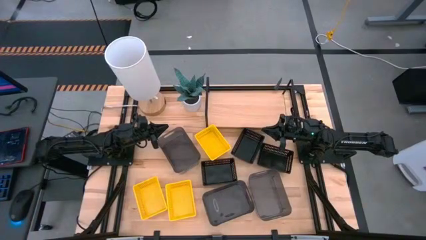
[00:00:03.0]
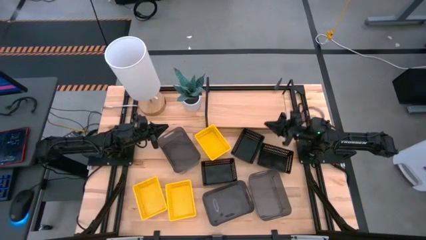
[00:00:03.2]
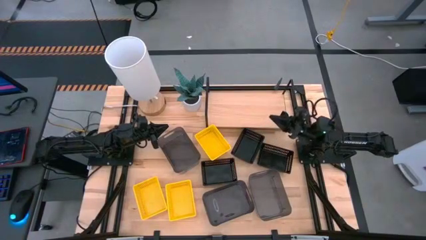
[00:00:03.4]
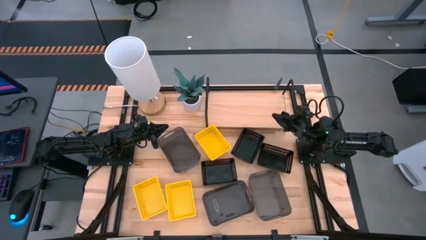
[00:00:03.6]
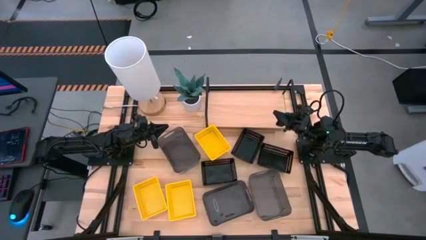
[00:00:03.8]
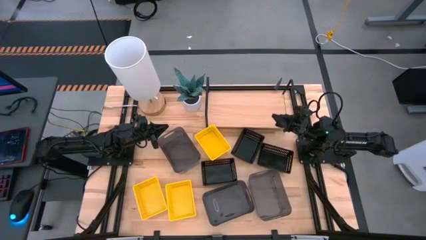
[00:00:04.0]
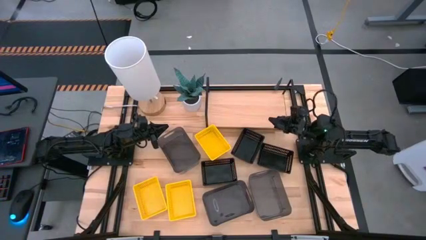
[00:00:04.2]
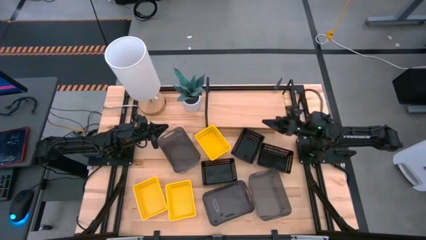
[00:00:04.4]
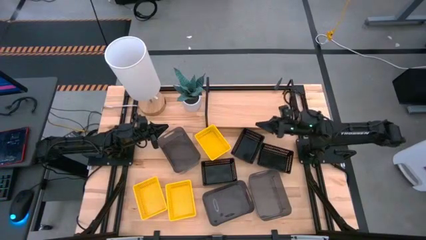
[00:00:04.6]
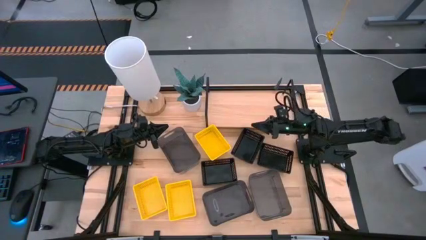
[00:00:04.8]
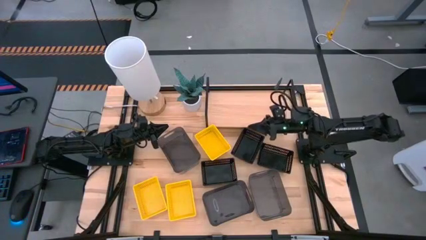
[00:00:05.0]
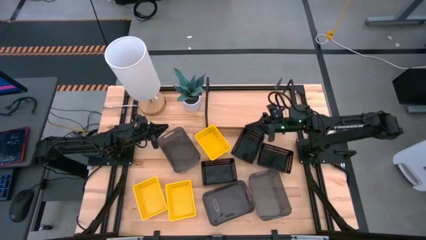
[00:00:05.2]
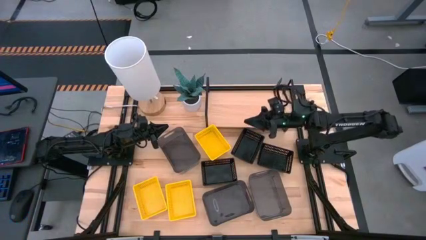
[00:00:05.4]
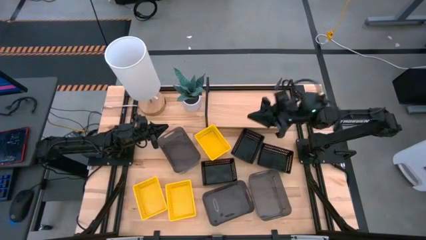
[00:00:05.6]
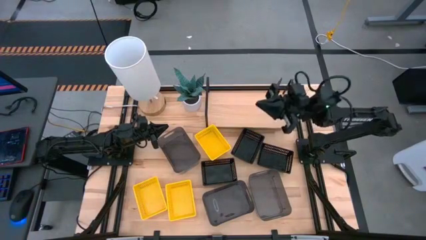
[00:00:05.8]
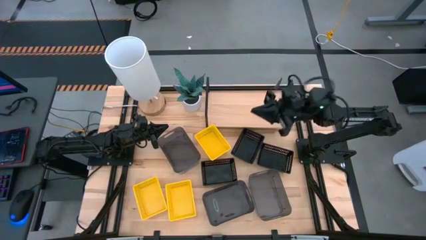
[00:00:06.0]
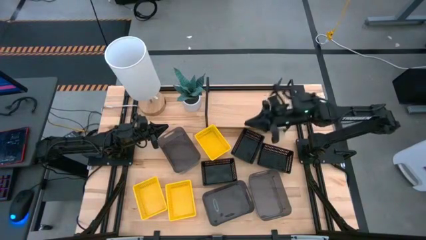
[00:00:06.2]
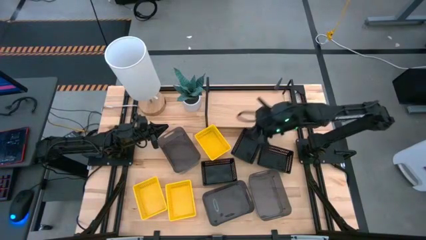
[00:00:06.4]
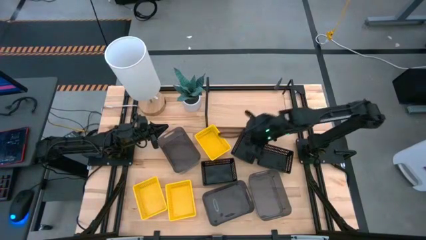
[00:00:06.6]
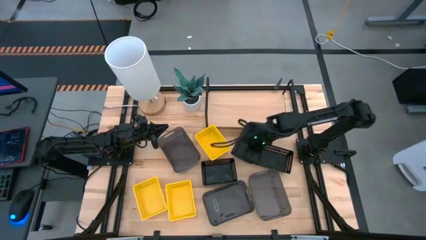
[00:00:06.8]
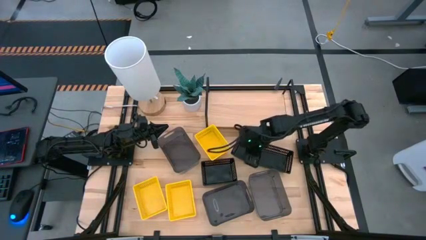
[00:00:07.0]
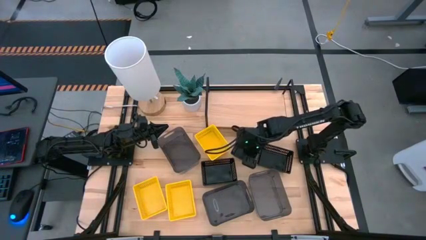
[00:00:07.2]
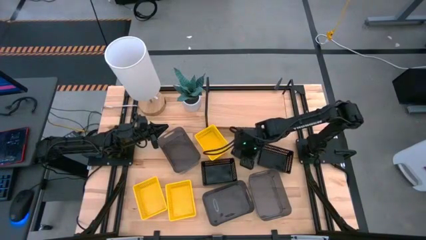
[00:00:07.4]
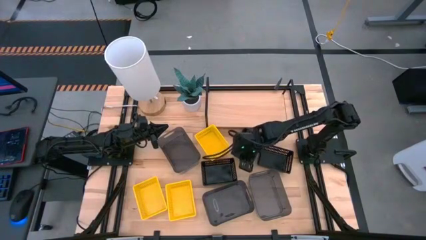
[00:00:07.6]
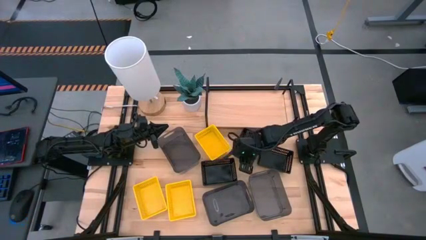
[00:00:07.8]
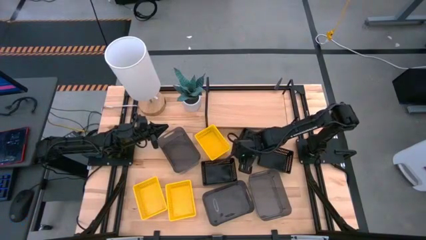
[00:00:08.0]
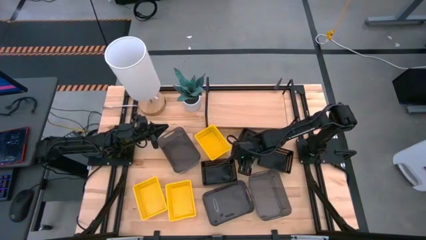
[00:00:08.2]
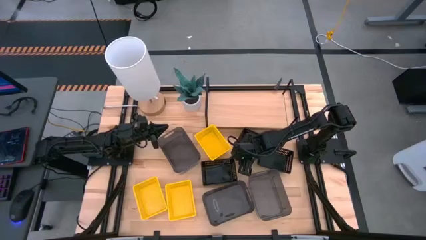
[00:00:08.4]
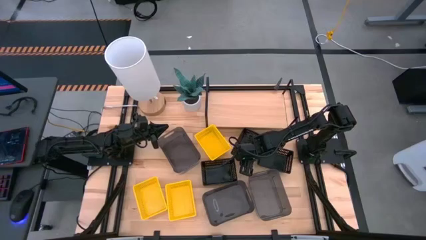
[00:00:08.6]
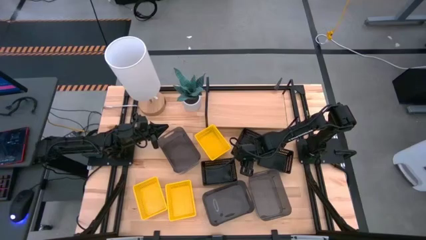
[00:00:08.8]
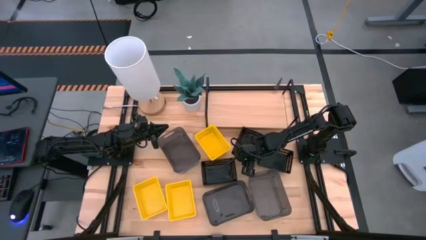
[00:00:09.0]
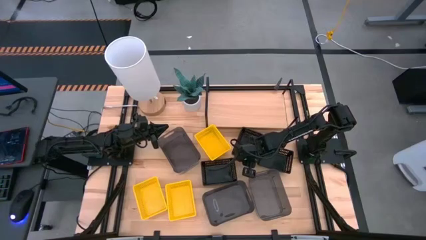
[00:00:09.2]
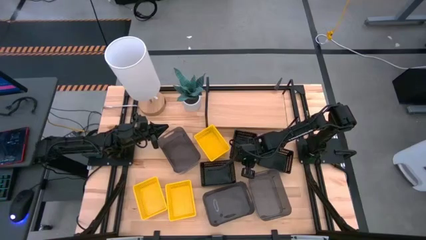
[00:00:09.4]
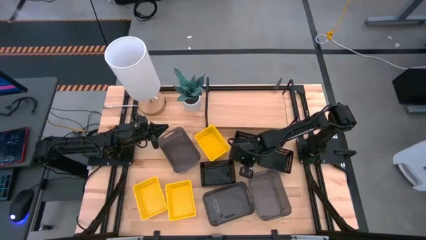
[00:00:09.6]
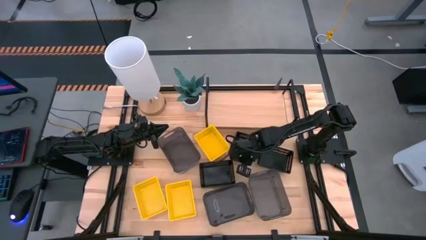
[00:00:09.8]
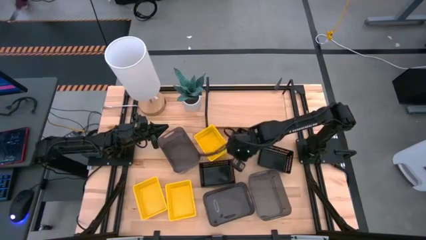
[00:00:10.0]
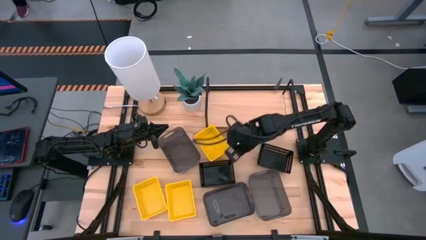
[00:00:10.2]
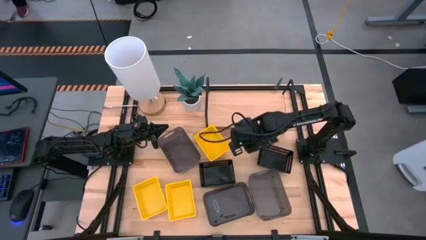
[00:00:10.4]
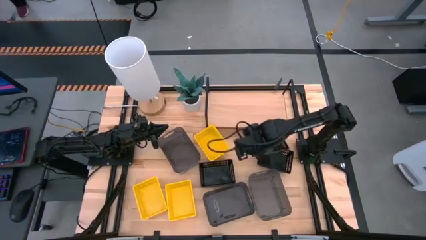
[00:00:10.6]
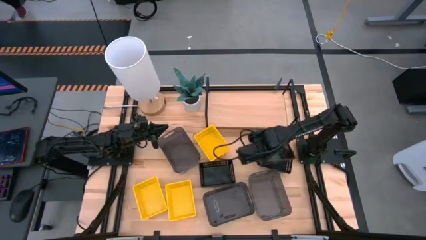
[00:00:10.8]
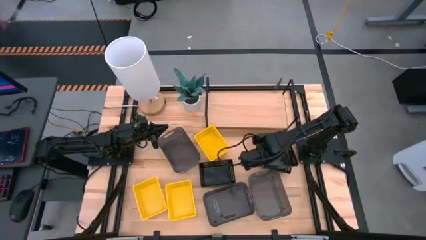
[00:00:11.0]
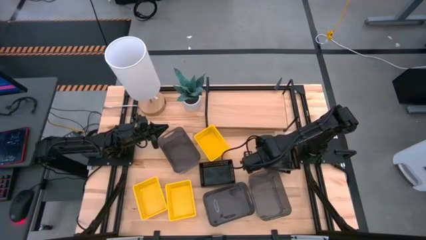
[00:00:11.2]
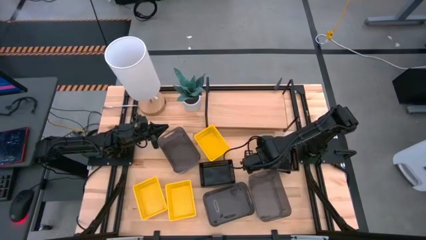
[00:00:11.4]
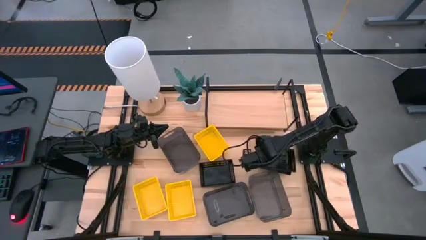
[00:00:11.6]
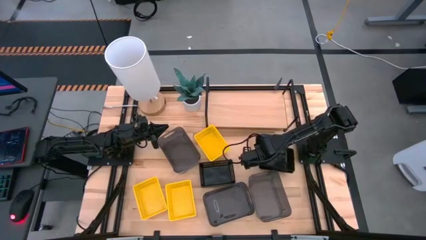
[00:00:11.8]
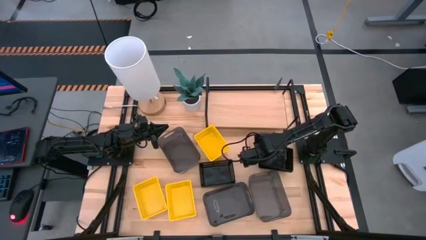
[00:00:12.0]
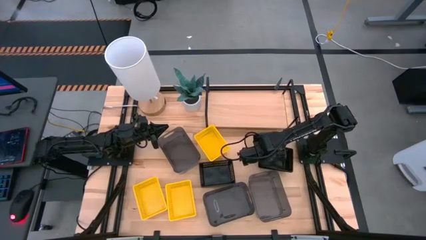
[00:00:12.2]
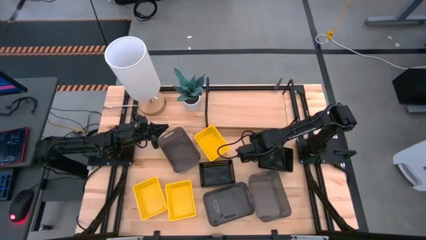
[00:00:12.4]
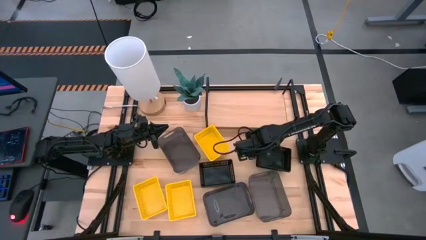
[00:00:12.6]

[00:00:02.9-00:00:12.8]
Task: Stack baskets on shelf by color
Stack the top black bin on the right black bin

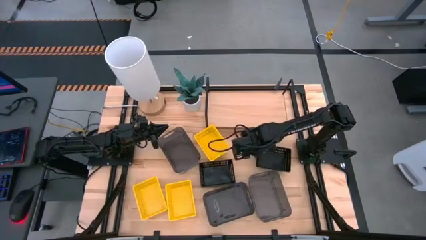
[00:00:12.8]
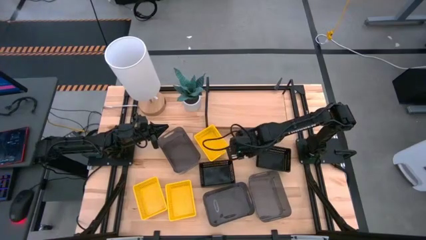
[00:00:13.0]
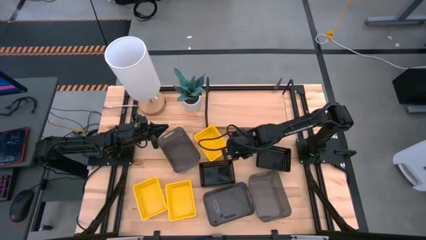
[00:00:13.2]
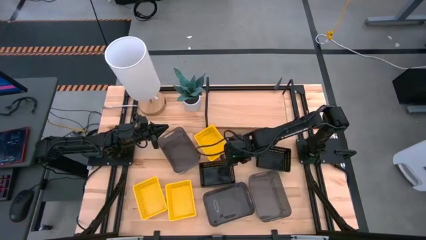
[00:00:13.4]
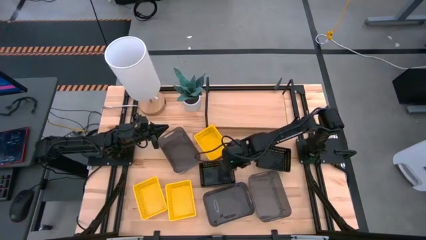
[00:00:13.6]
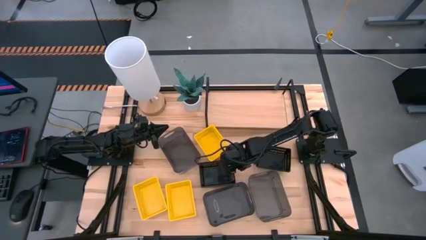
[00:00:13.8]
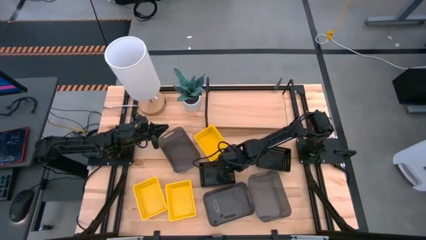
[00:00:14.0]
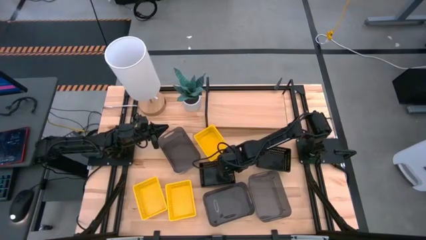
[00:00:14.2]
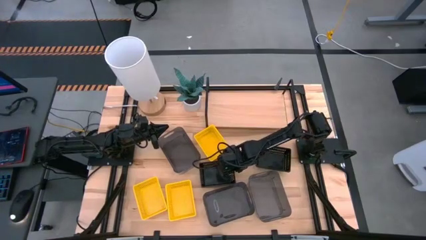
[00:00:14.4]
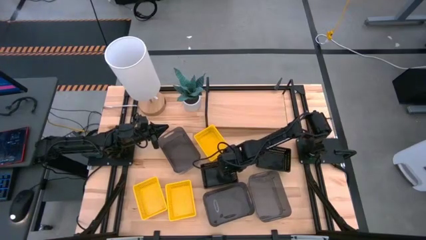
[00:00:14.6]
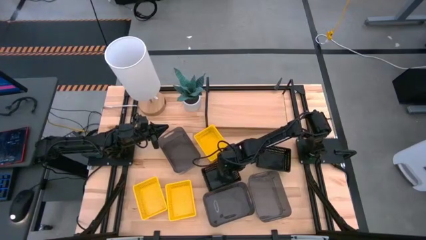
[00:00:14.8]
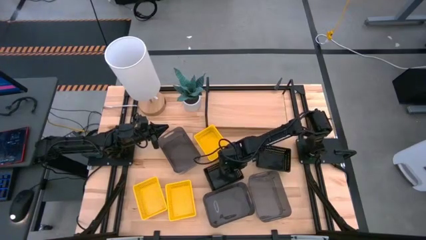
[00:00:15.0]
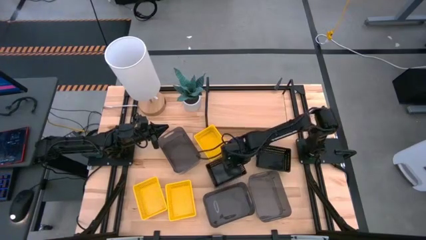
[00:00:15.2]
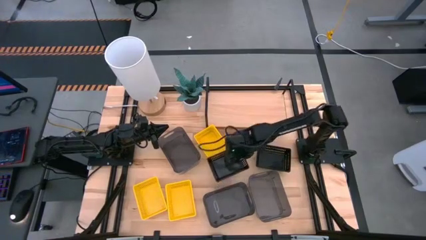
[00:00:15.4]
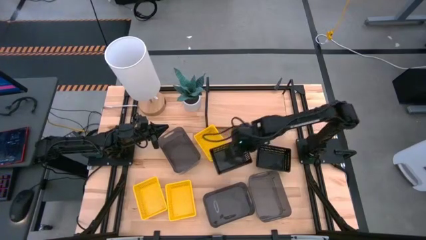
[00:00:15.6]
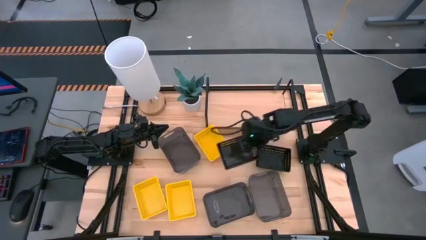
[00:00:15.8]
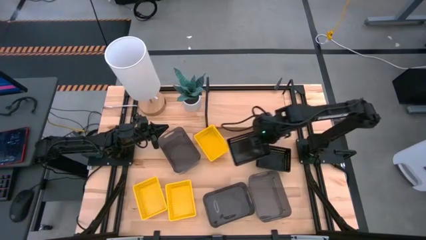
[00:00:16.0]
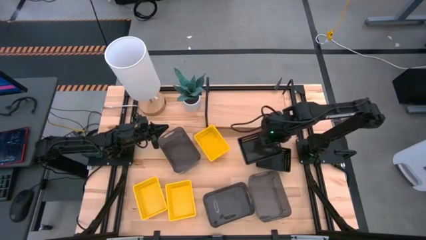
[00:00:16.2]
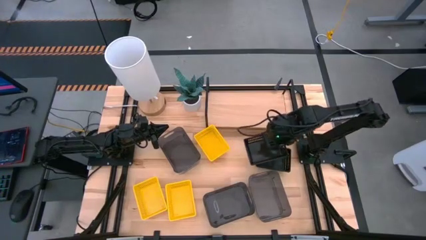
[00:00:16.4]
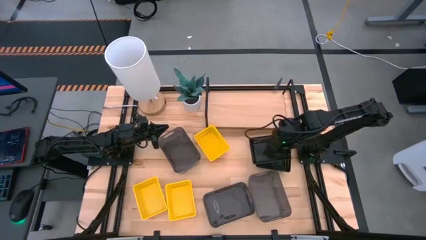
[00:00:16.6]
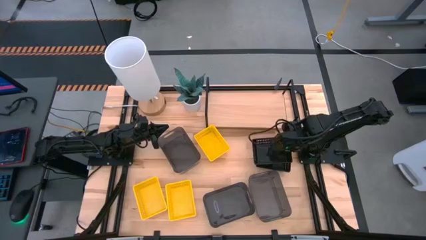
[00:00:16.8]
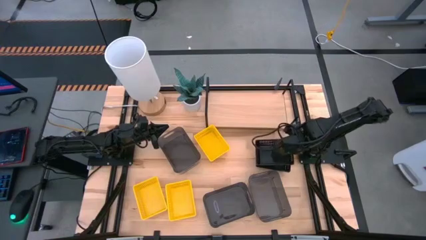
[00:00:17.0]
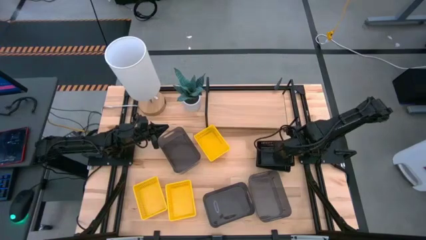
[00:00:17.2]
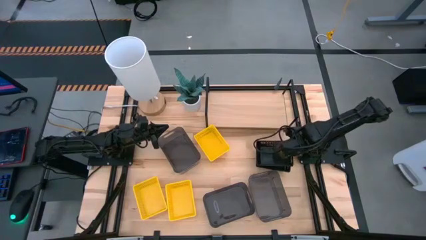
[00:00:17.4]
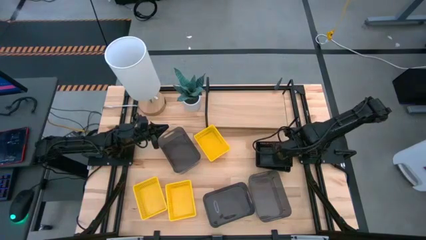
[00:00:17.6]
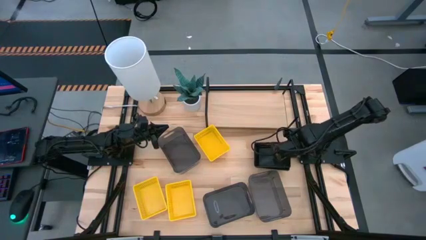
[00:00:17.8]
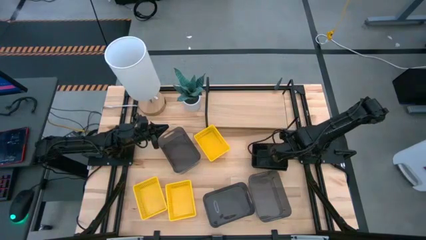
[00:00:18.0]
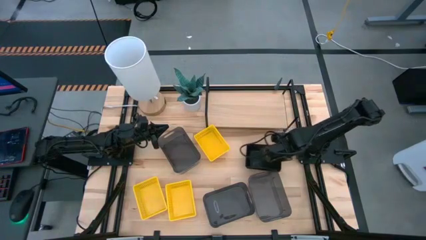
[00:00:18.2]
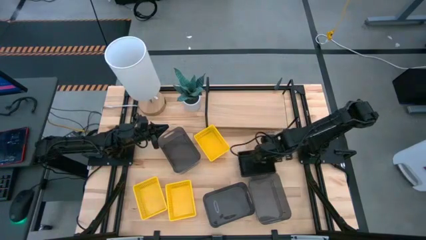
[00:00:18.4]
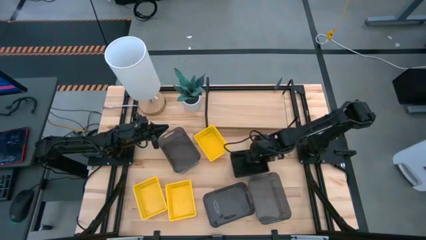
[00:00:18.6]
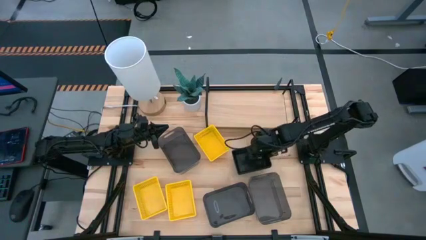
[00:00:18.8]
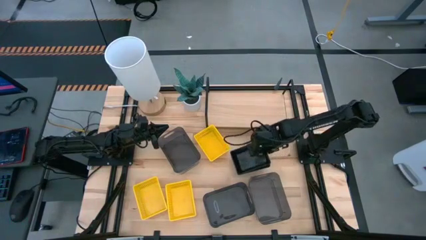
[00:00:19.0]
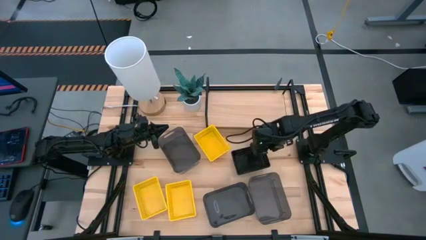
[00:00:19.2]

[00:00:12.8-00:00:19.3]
Stack the left black bin on the right black bin
